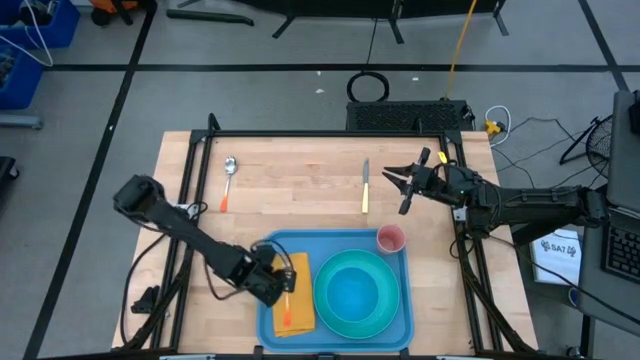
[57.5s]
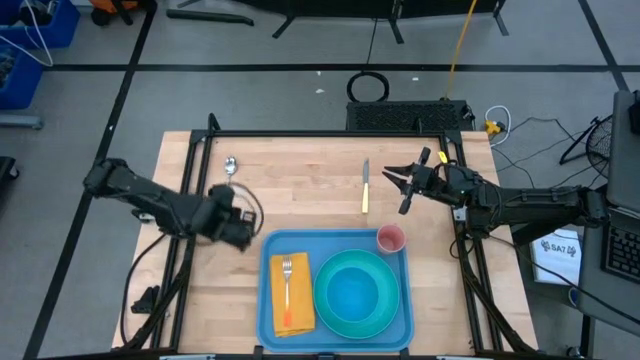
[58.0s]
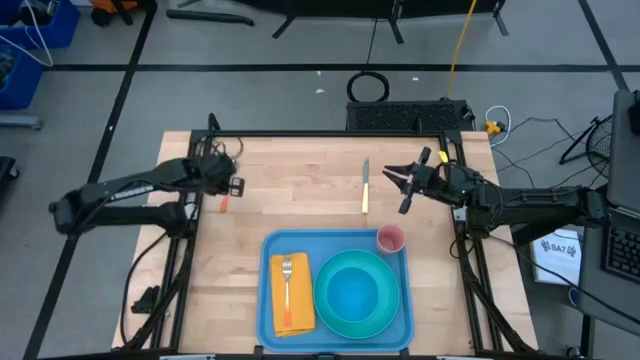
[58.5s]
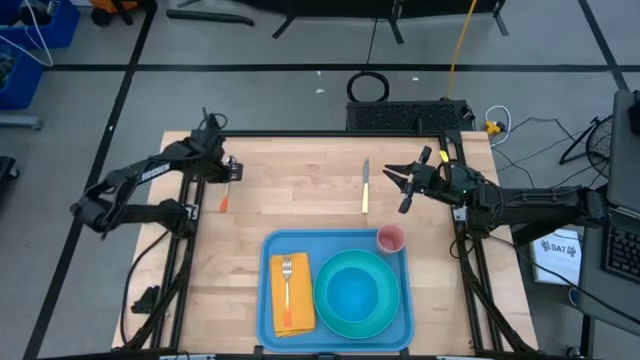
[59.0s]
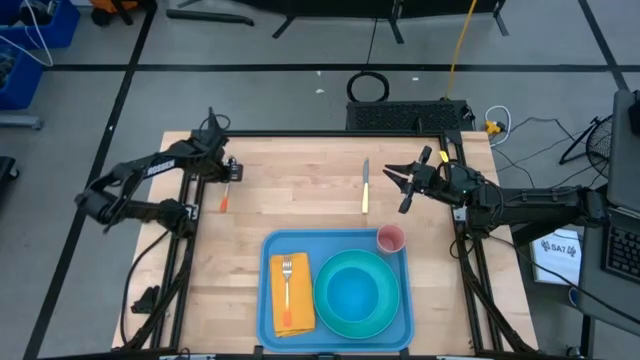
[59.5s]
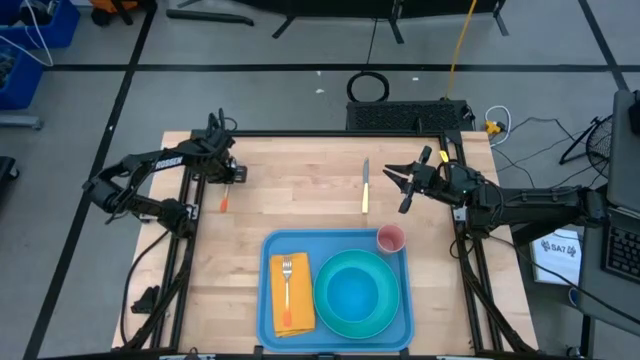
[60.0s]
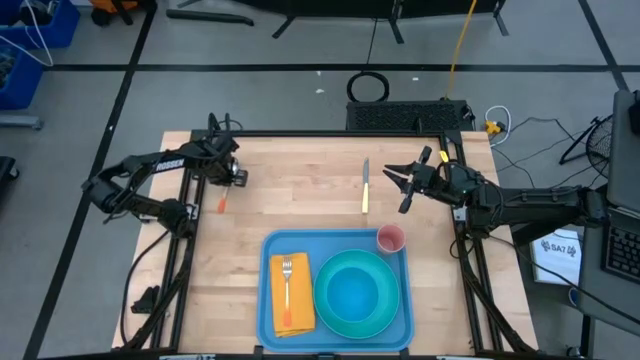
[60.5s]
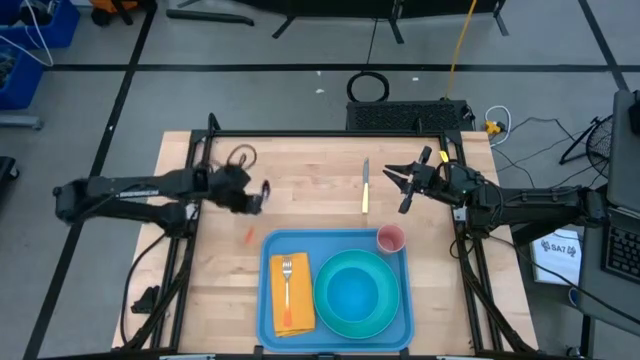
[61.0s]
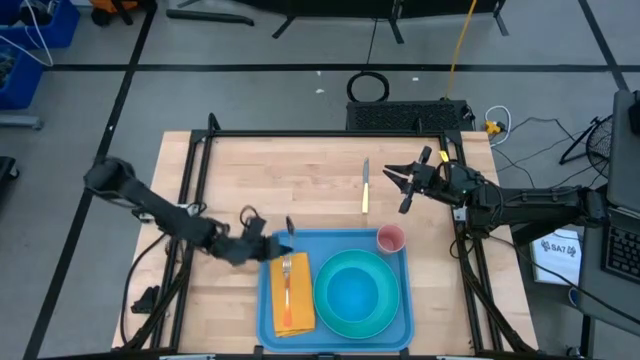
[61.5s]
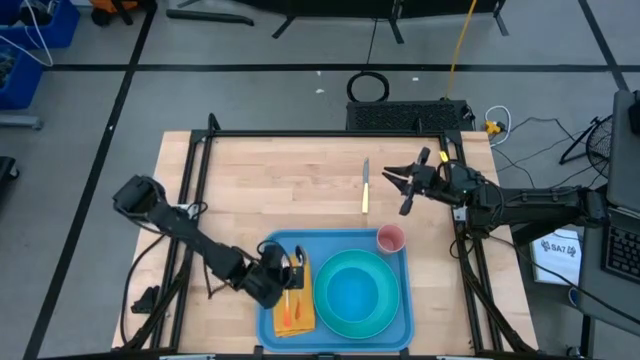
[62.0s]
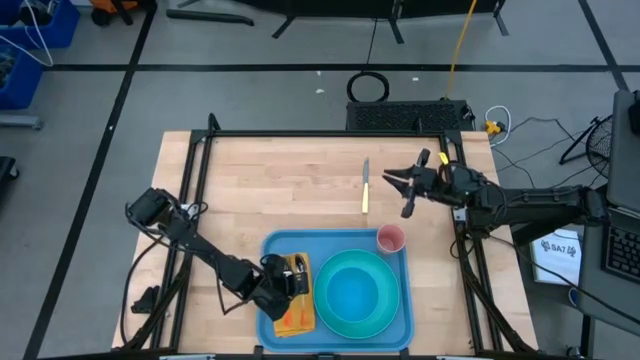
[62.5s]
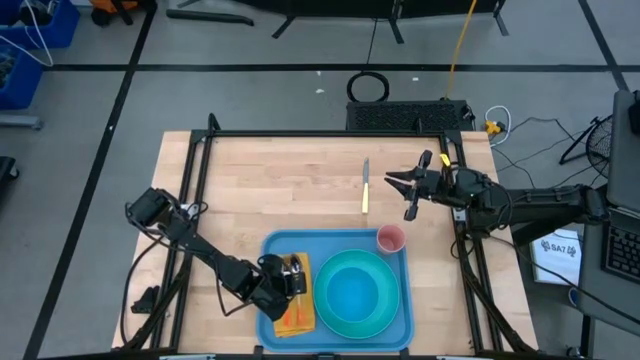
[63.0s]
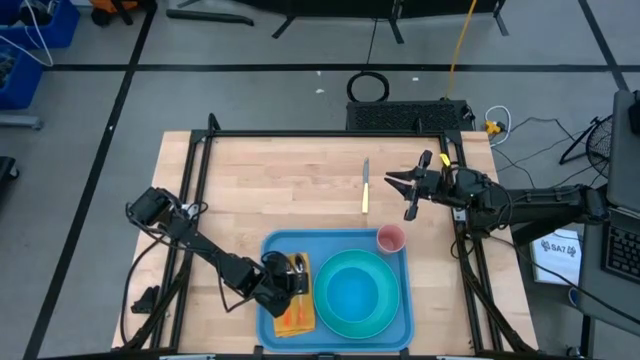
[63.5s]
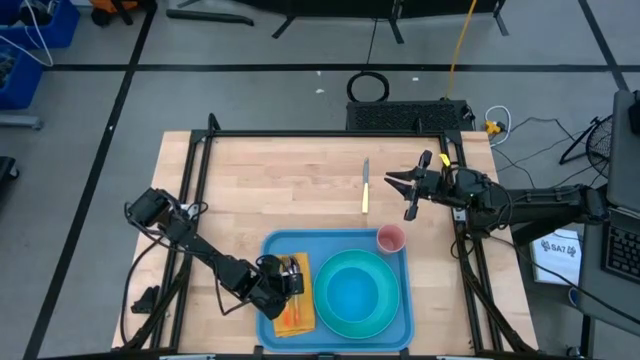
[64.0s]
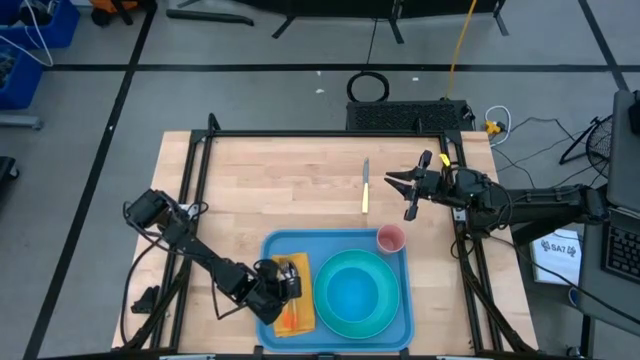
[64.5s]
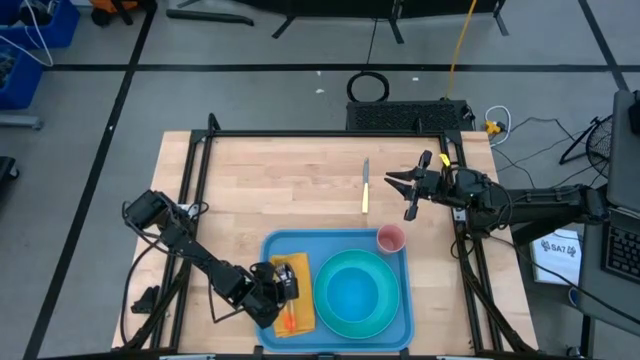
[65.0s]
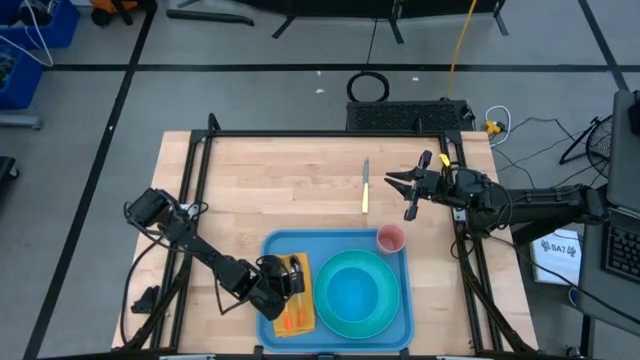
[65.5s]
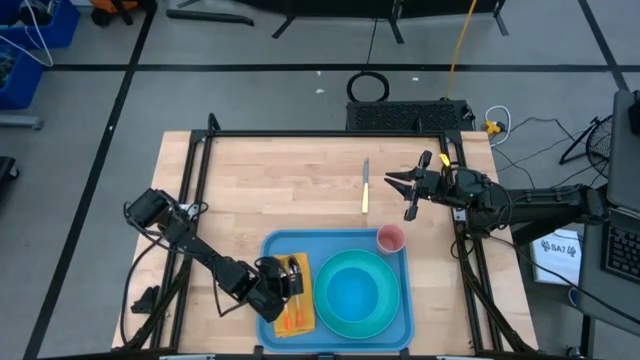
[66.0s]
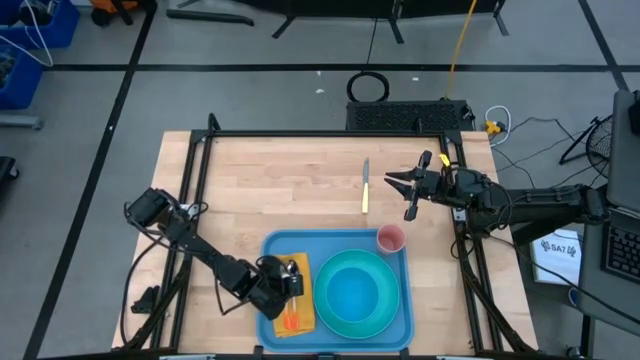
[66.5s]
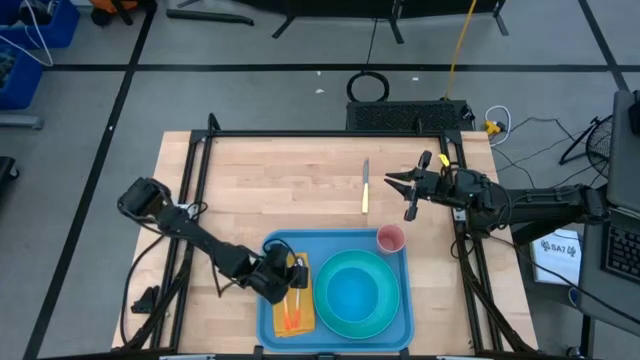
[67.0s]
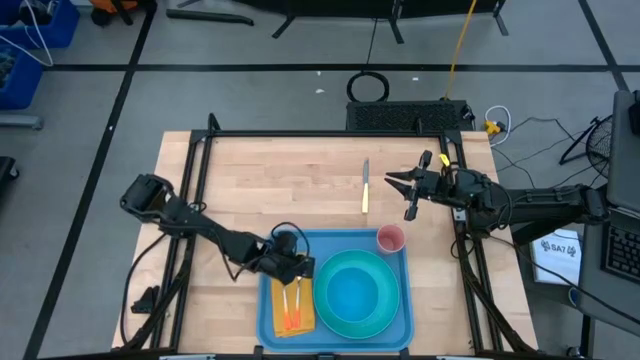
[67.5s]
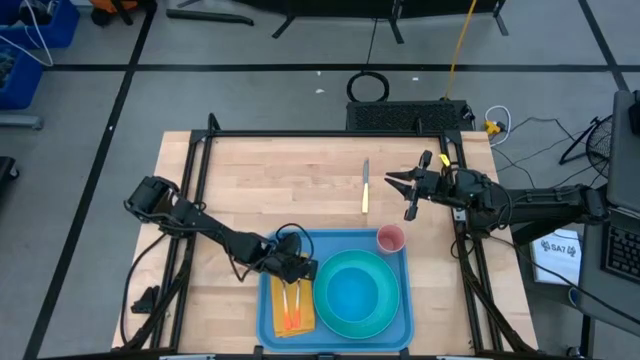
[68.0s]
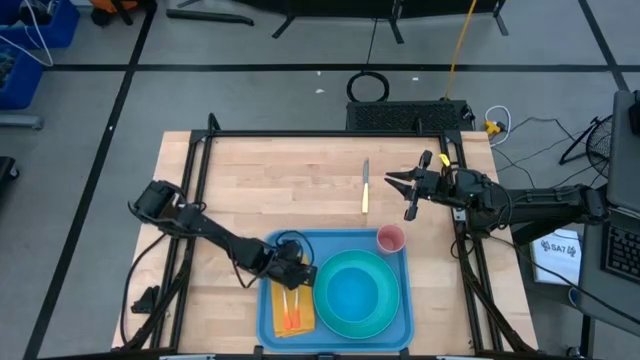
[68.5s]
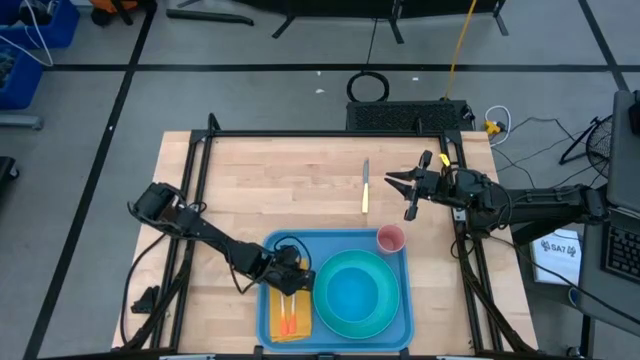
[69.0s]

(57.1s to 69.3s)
Task: Set up tray
Put the orange spoon on the yellow table napkin beside the orange fork

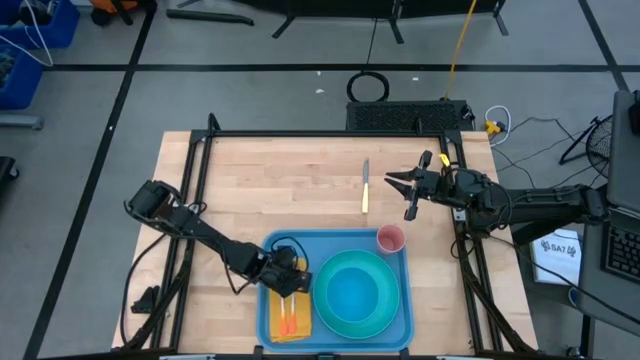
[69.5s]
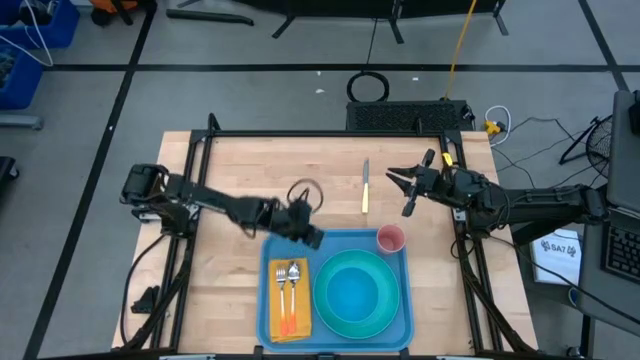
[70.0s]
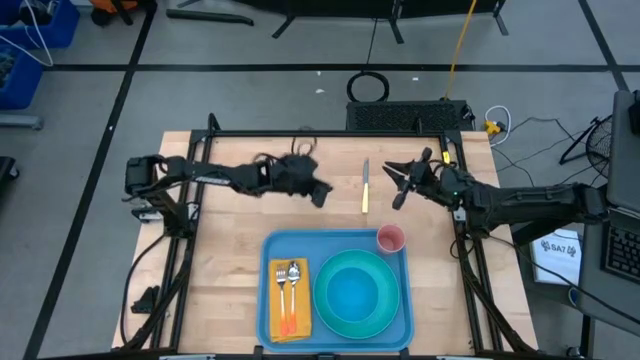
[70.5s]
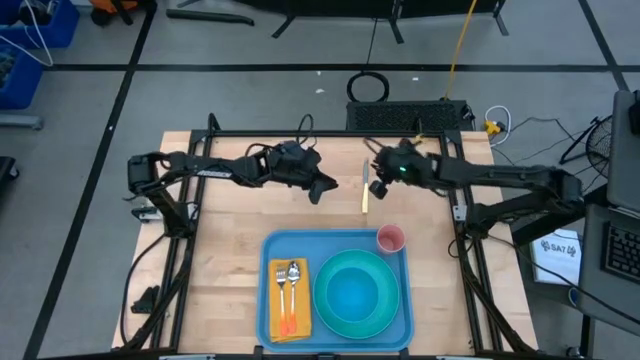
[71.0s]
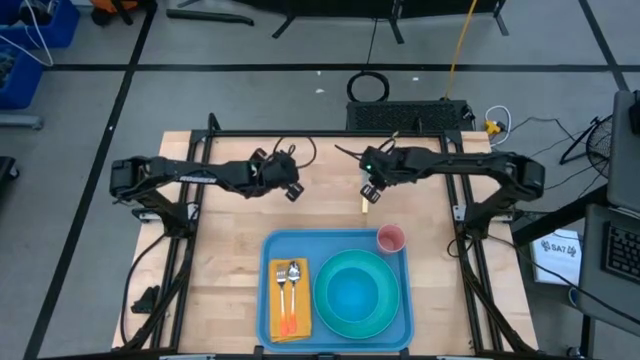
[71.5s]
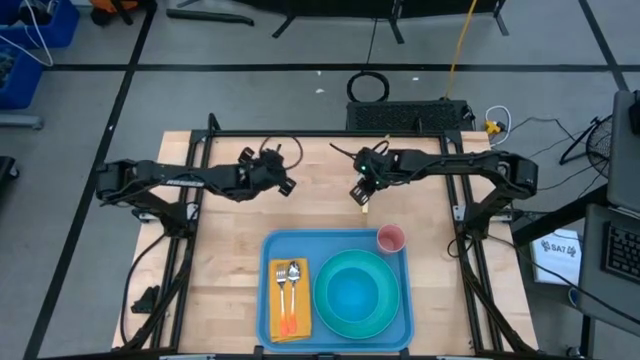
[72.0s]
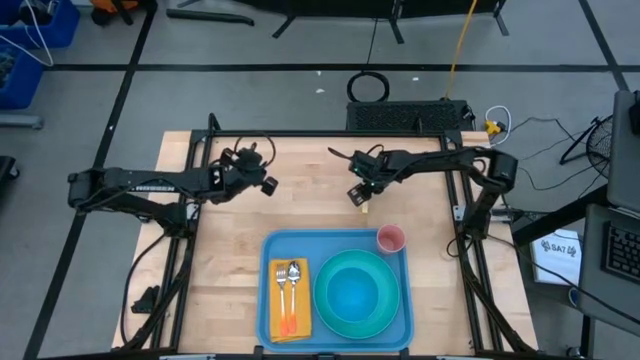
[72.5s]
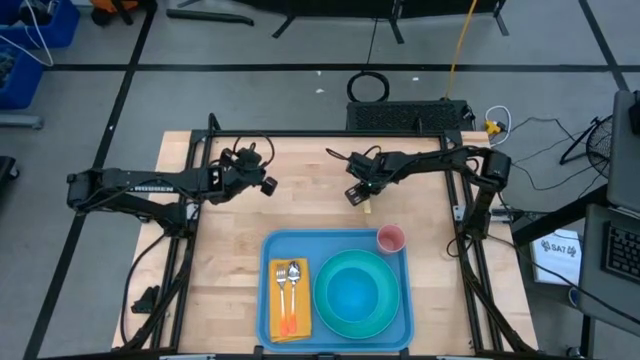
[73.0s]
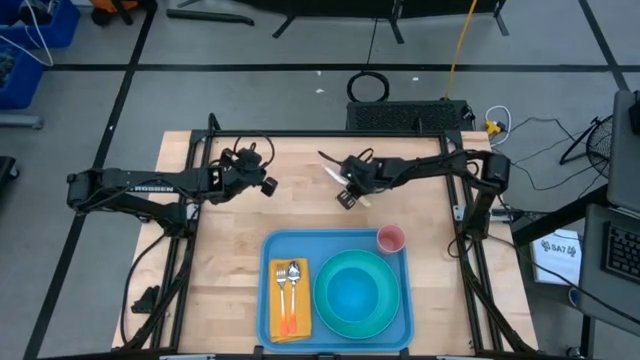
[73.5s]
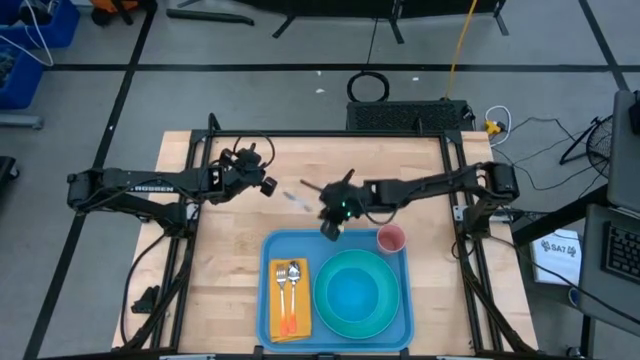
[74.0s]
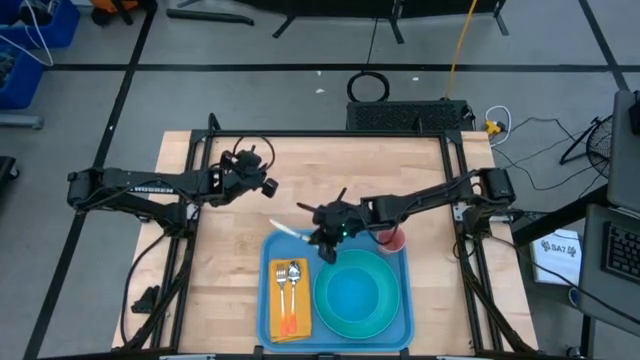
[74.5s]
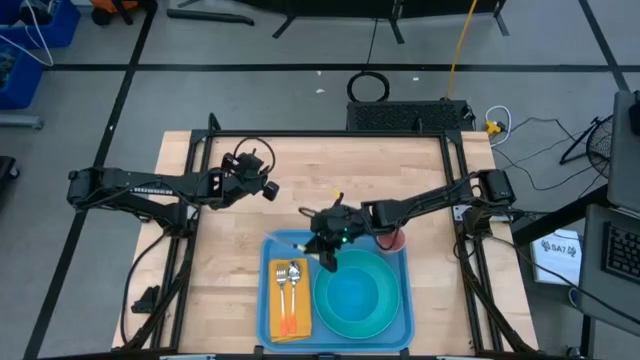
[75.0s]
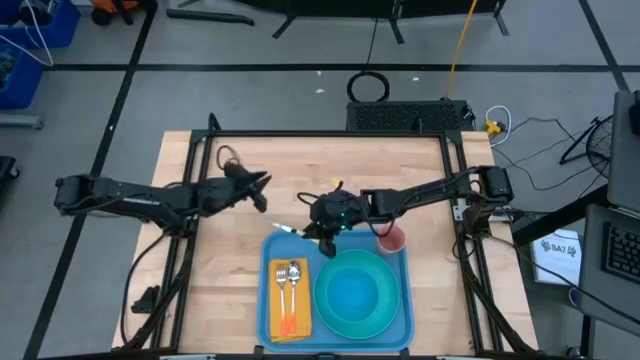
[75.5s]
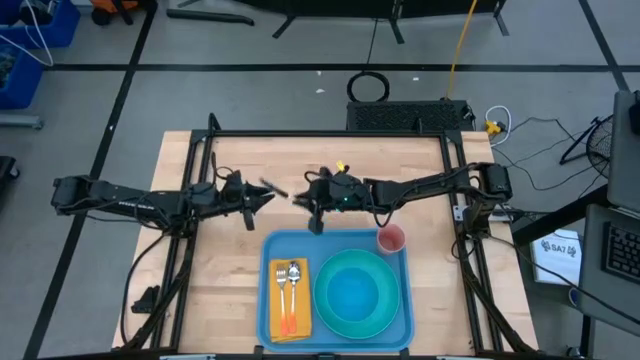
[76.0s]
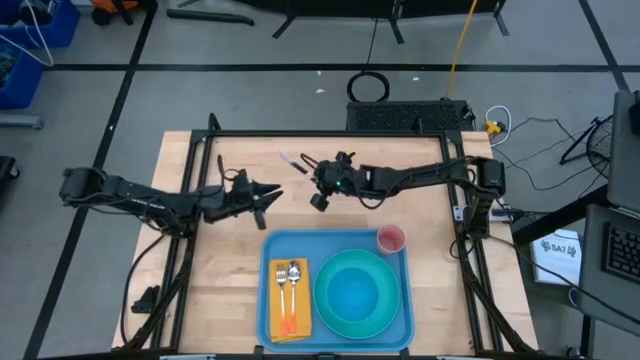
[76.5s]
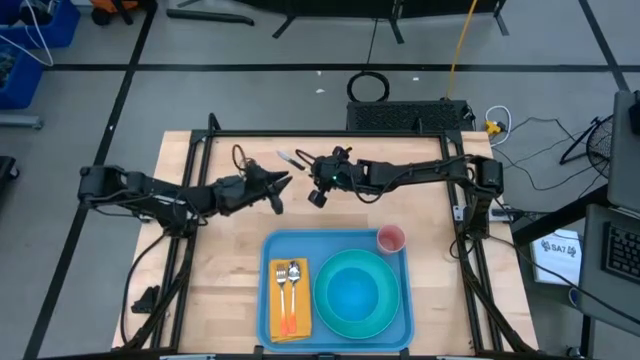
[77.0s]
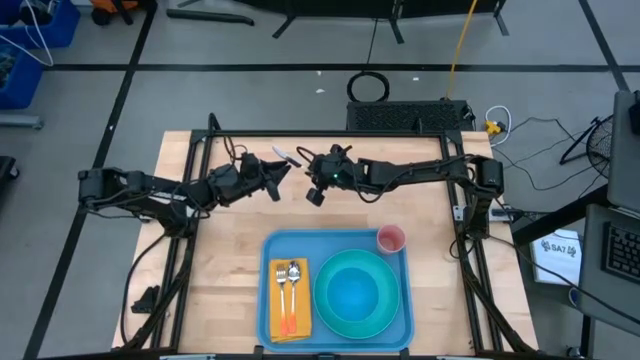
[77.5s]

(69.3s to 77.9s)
Put the yellow table knife on the yellow table napkin beside the orange spoon

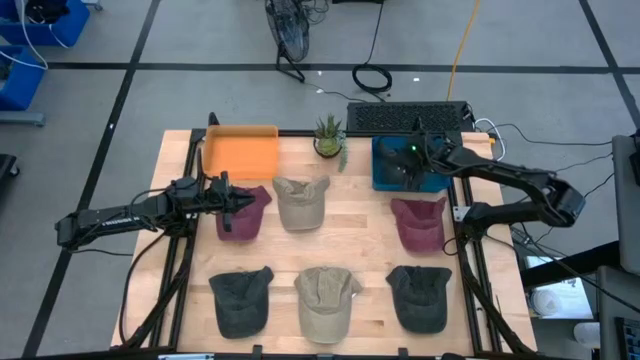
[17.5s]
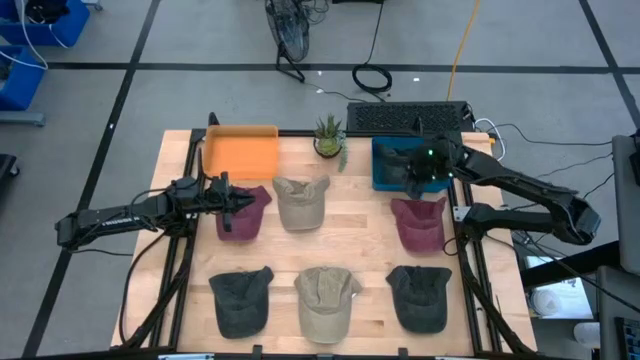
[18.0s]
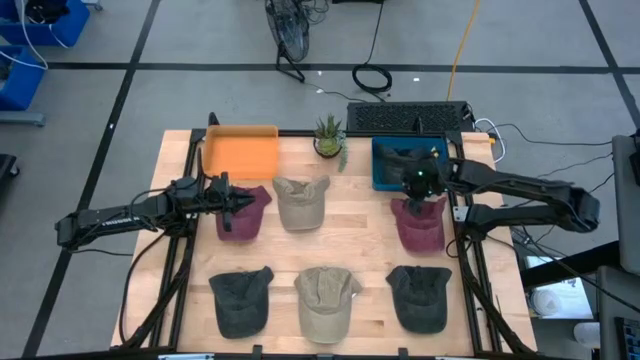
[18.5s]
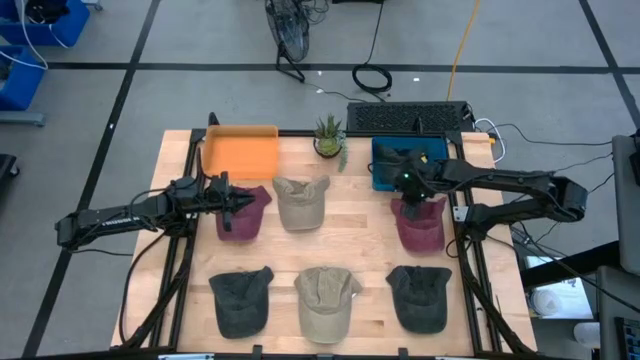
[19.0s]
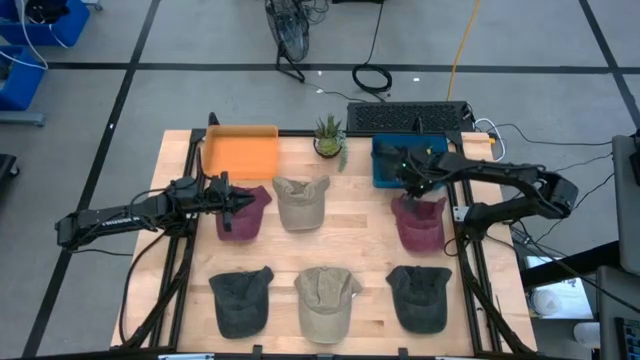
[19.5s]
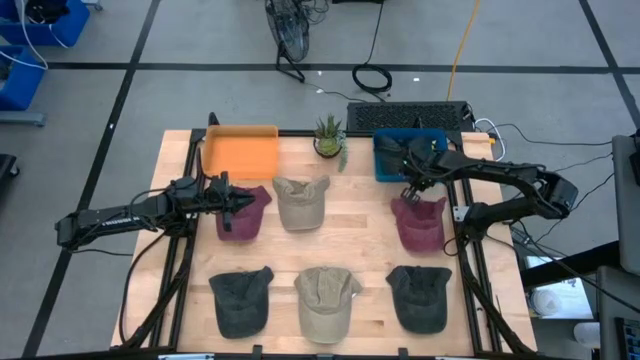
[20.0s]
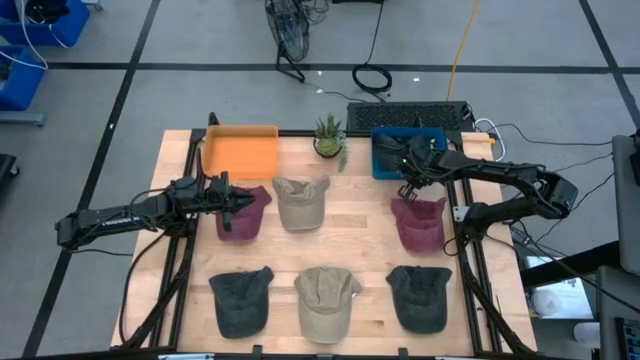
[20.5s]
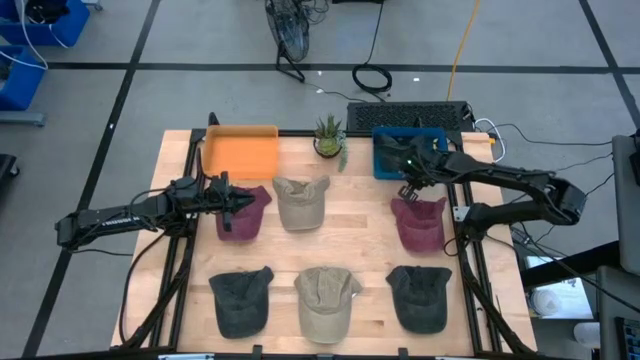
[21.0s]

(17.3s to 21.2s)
Task: Pick & Place hat
Adjust the blue bin
